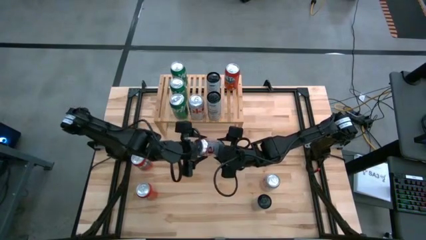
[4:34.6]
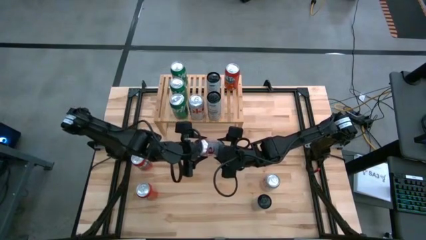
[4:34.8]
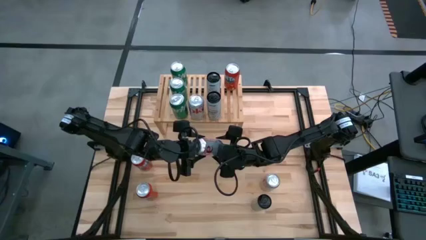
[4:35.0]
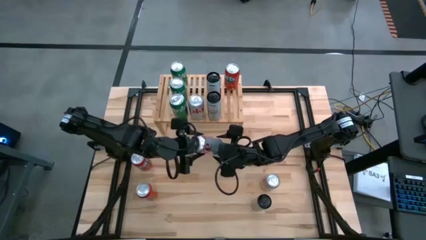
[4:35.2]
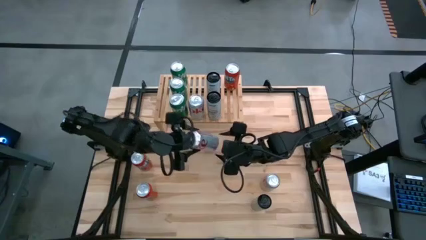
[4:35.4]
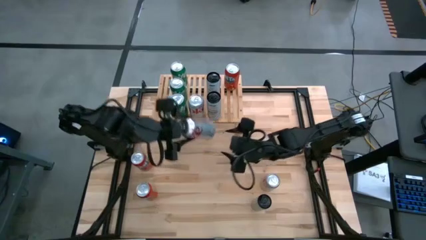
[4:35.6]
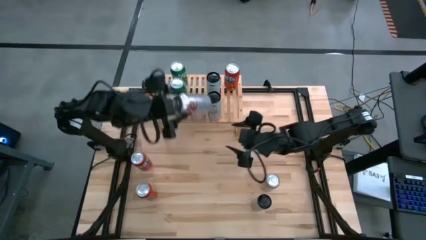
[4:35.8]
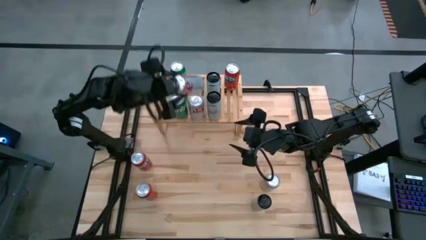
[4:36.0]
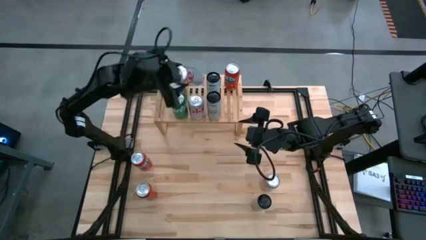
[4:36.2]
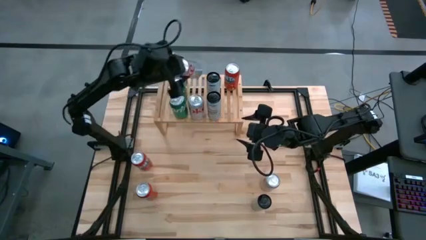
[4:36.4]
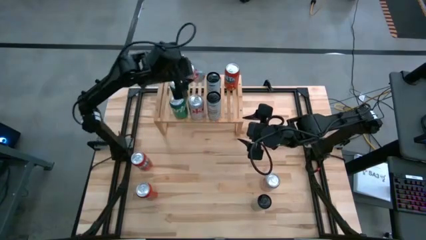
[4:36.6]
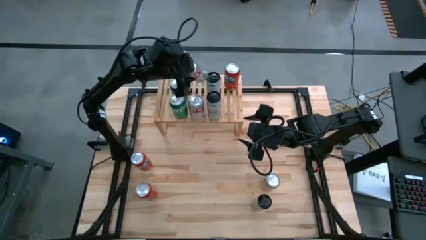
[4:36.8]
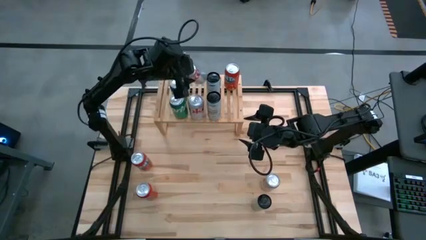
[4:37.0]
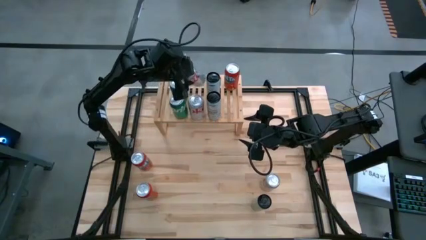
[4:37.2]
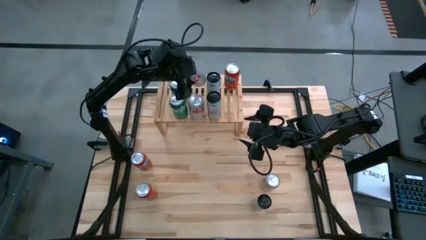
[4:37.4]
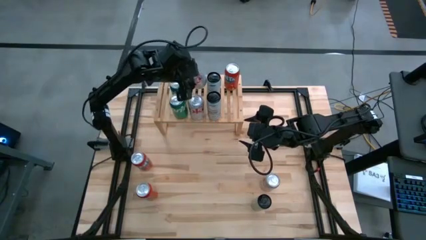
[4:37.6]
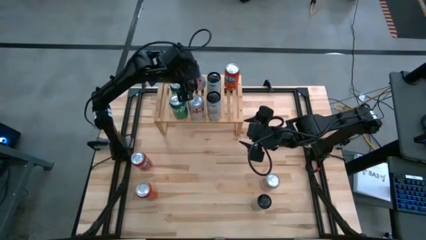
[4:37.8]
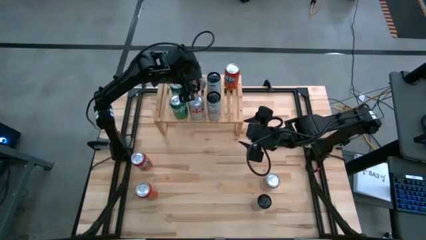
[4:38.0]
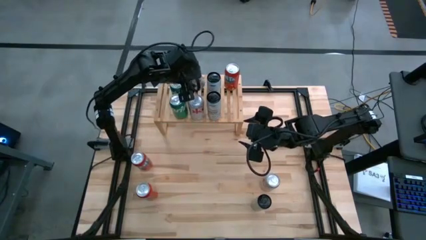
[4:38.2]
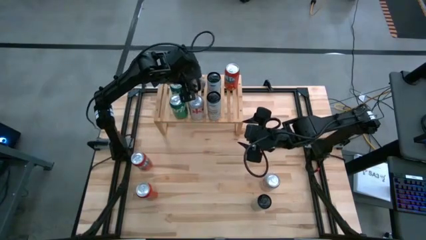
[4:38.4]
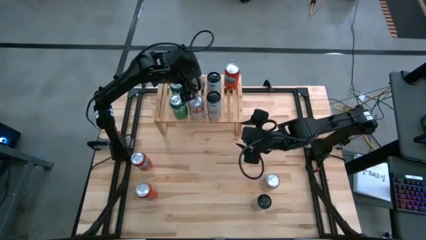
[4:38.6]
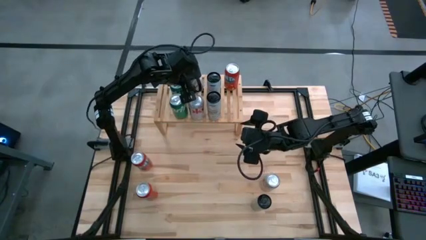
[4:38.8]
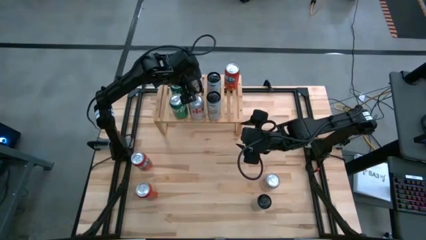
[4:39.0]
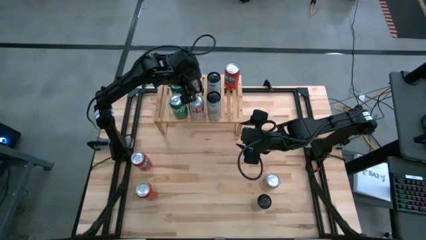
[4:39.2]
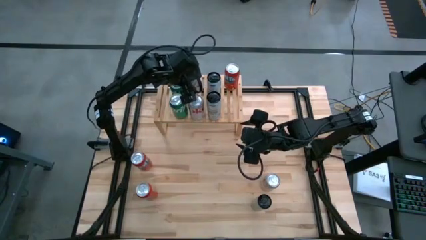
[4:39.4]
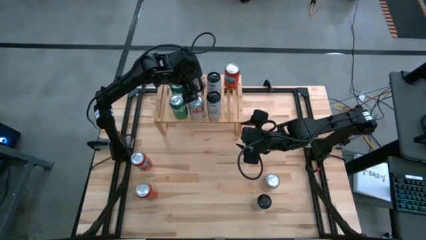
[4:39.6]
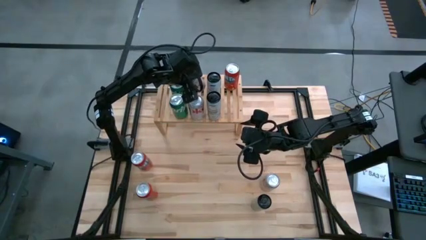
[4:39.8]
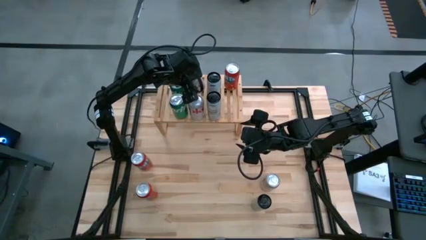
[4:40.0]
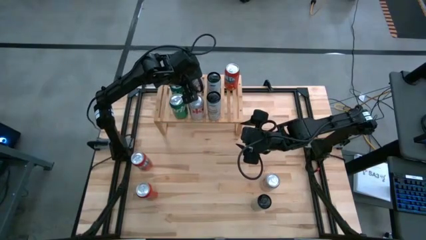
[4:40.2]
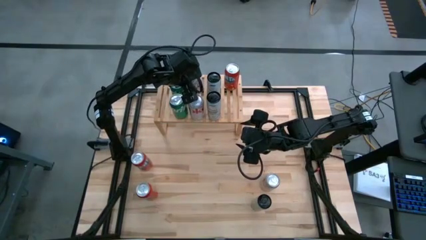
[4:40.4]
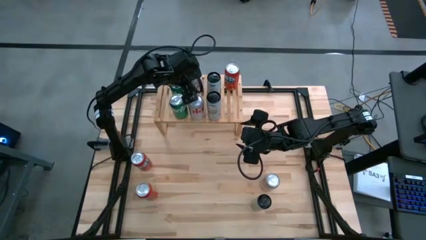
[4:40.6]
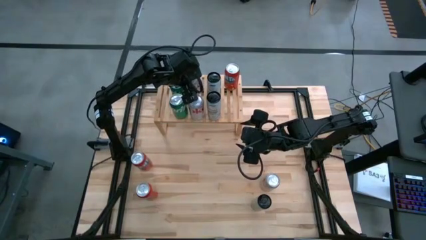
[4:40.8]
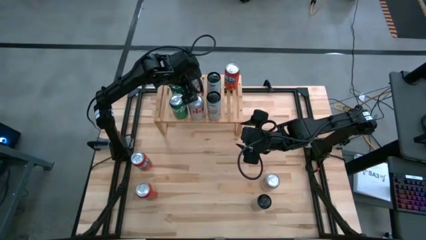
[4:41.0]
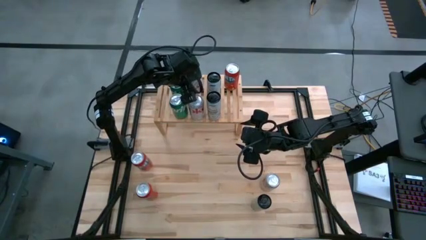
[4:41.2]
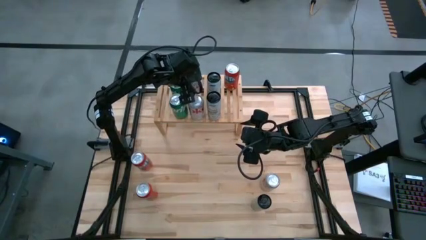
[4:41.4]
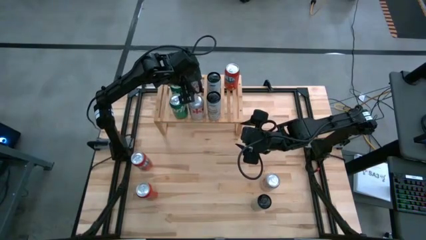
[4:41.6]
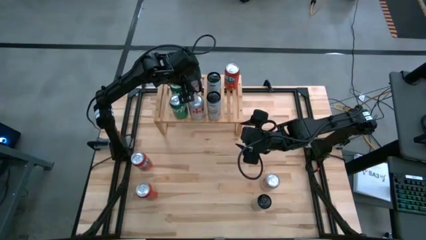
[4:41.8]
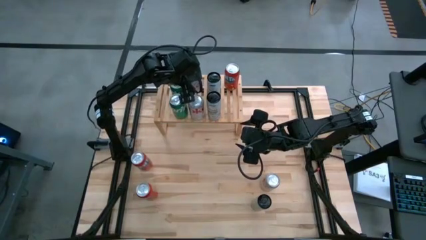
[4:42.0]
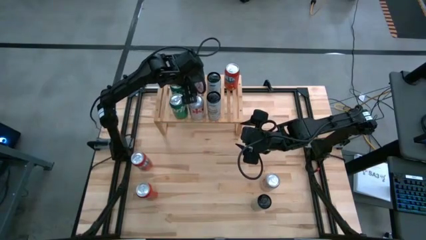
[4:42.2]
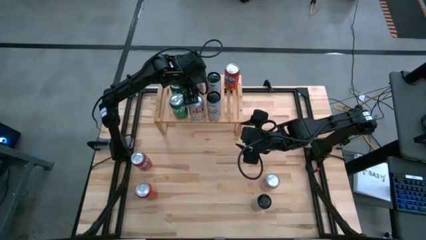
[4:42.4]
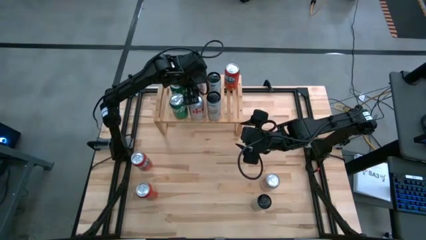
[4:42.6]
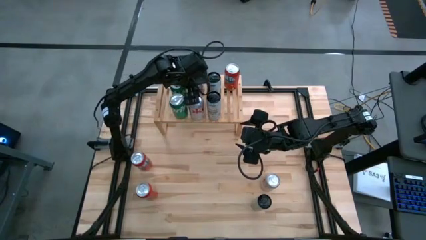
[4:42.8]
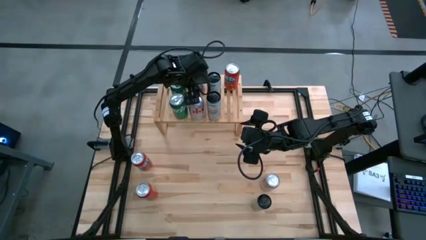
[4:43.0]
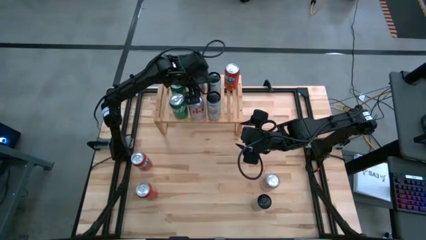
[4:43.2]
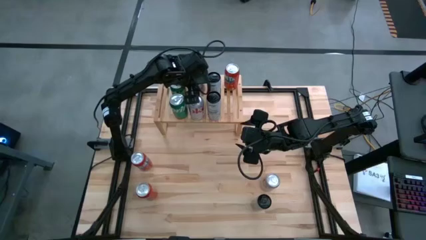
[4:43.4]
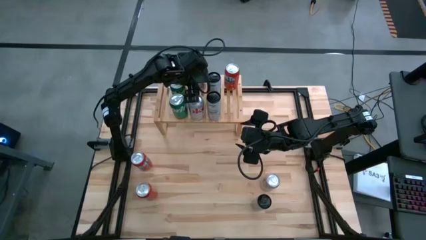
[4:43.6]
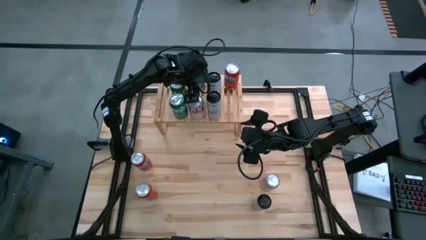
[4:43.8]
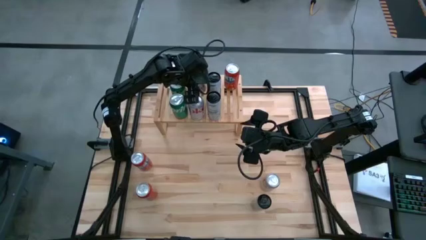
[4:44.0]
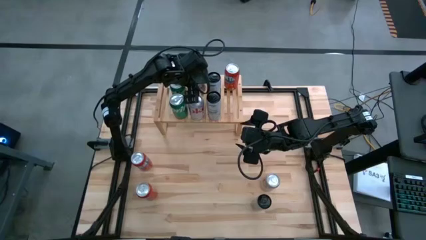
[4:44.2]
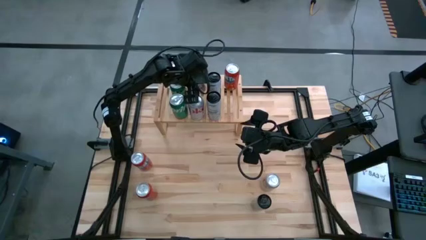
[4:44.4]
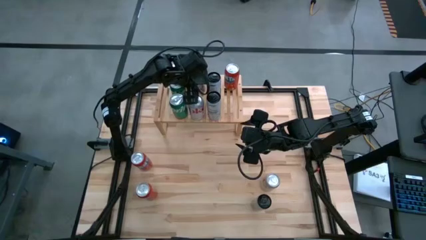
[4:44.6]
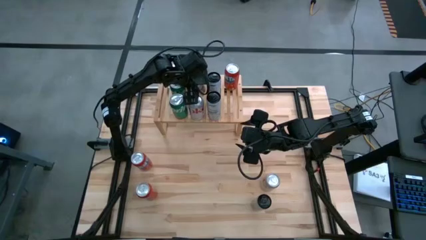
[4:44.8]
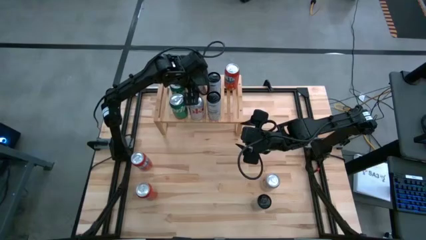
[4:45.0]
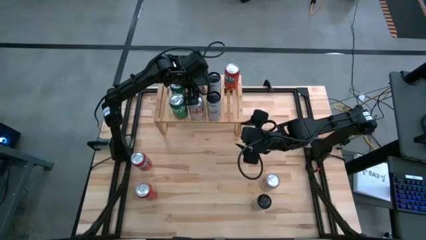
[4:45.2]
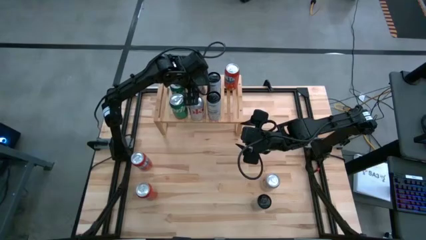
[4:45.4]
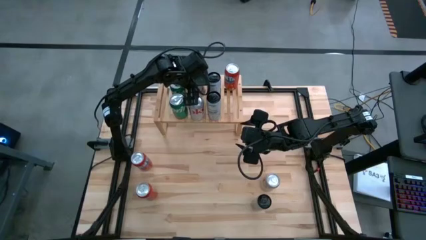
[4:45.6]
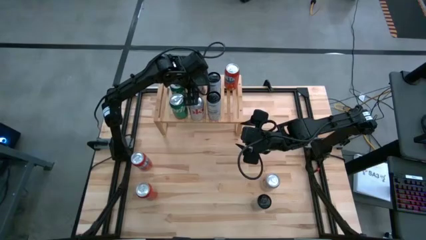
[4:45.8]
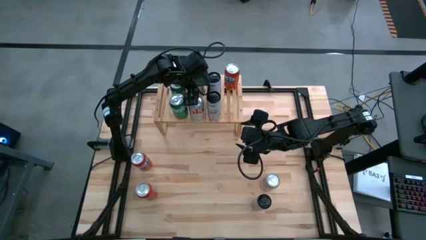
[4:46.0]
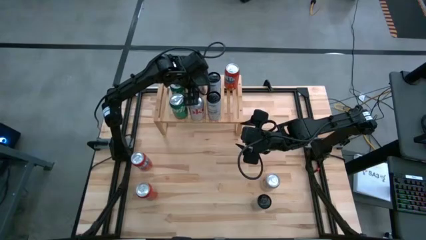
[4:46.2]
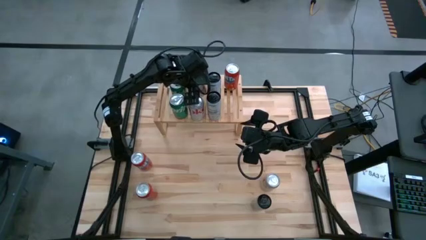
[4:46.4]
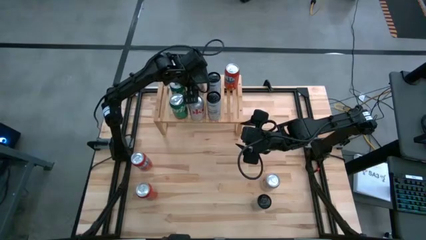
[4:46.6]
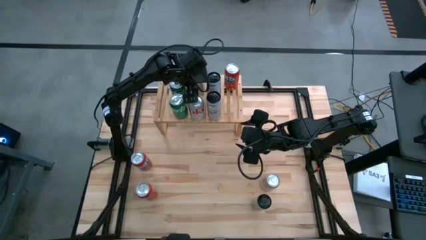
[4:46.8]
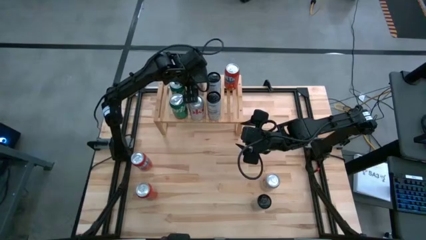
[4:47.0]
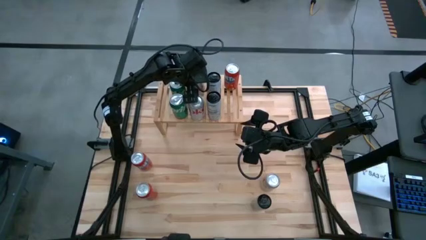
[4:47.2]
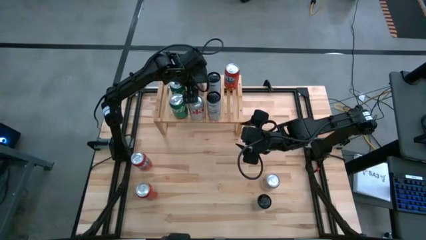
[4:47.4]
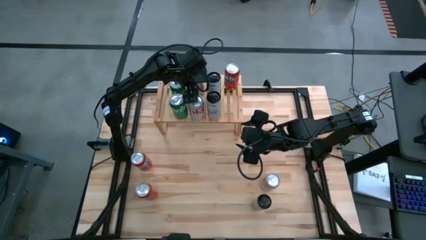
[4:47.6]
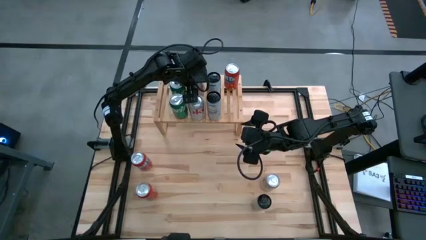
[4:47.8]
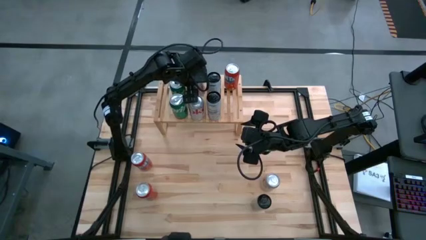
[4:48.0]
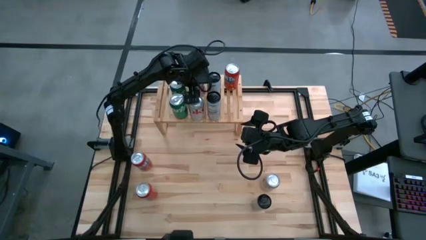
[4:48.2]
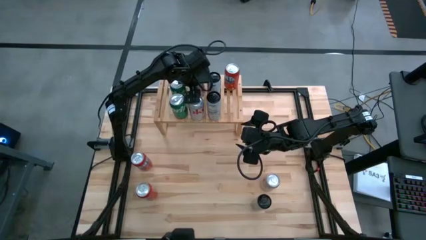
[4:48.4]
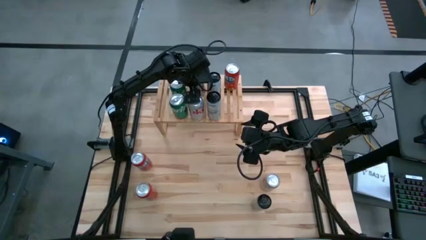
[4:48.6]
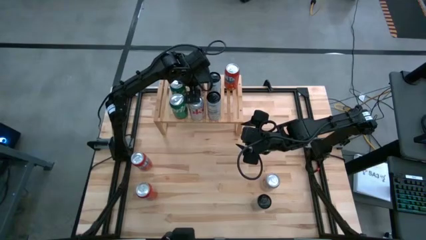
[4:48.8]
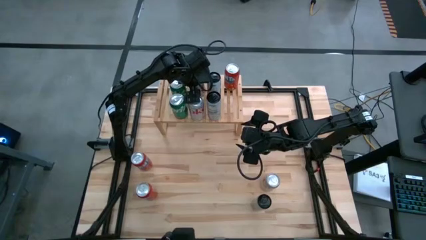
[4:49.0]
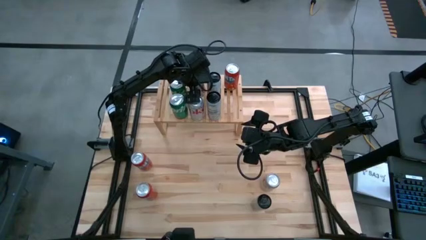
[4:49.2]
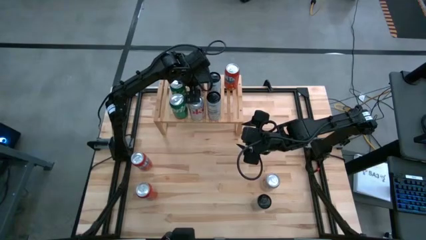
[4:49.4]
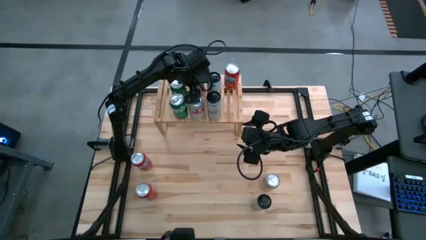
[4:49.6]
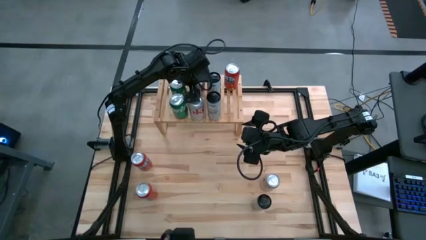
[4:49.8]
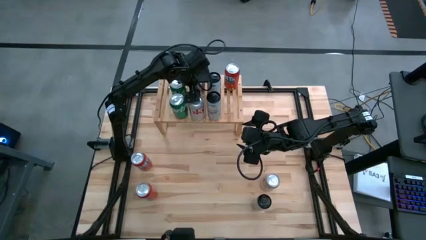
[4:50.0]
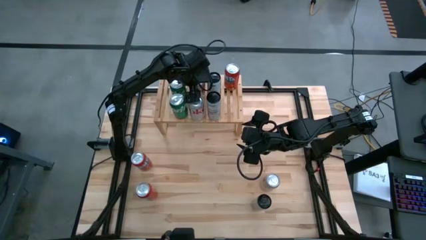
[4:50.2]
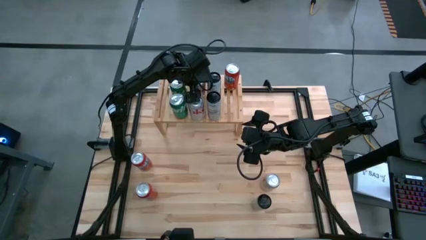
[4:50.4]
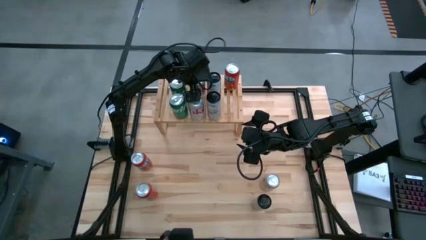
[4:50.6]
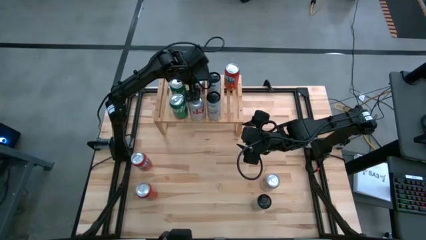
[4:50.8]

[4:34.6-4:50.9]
Task: Place canned beverage on shelf
Put the white soda can on the shelf
